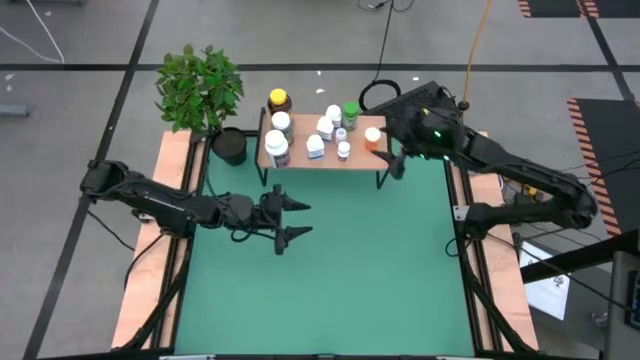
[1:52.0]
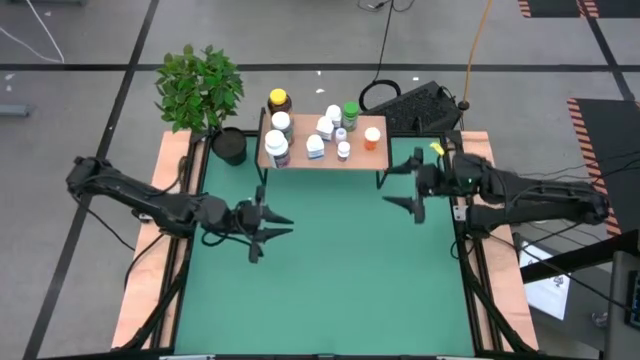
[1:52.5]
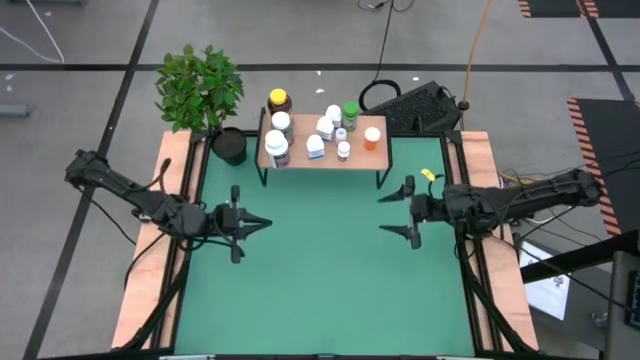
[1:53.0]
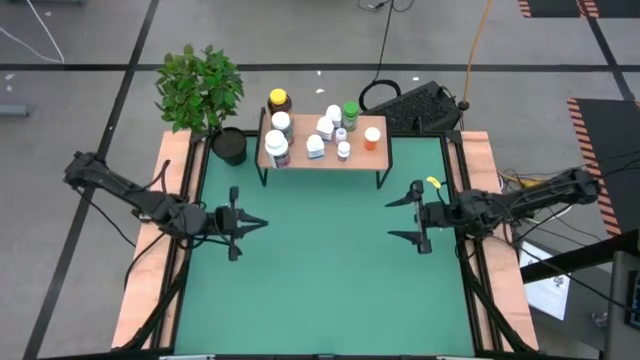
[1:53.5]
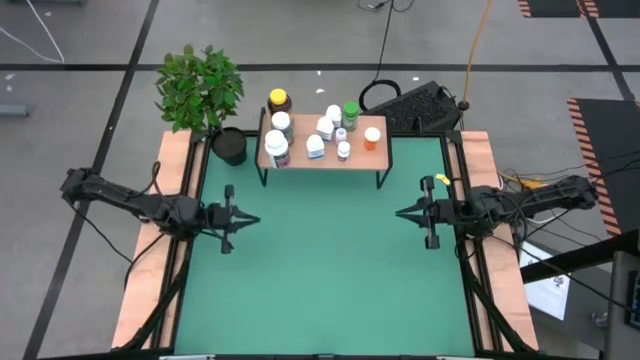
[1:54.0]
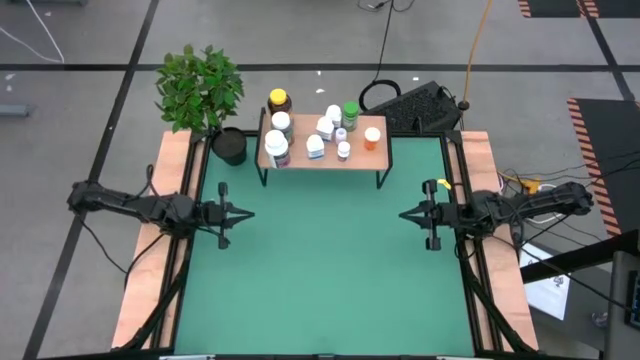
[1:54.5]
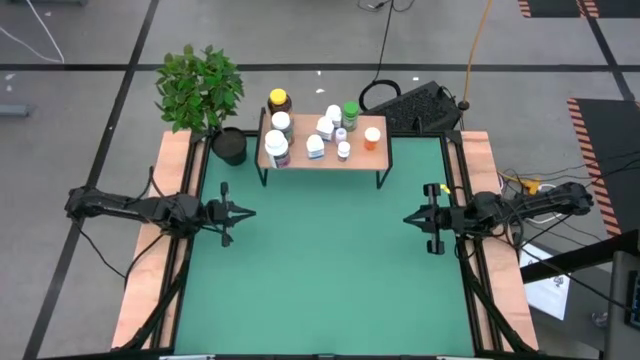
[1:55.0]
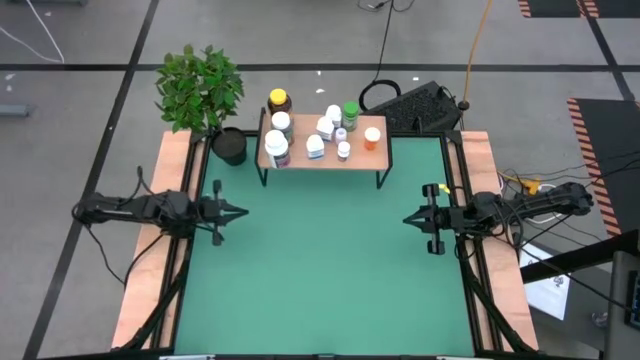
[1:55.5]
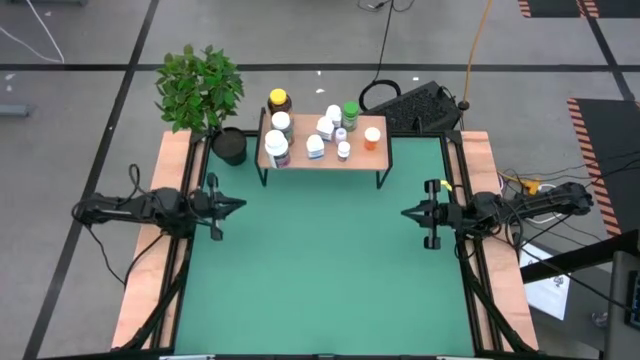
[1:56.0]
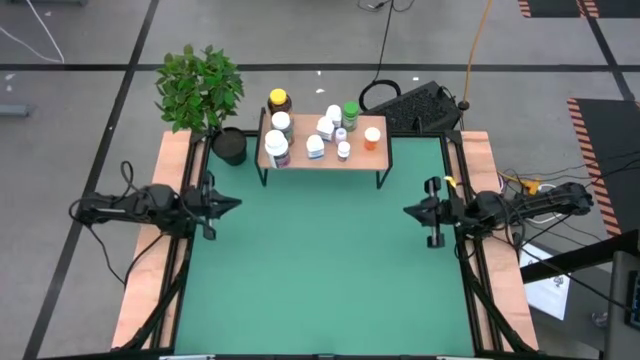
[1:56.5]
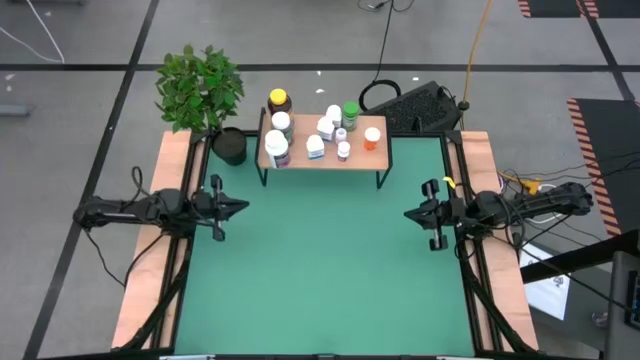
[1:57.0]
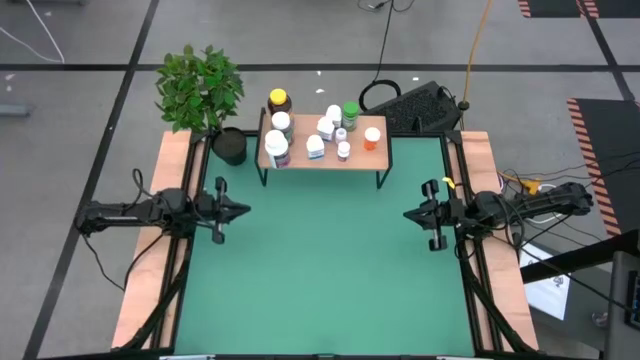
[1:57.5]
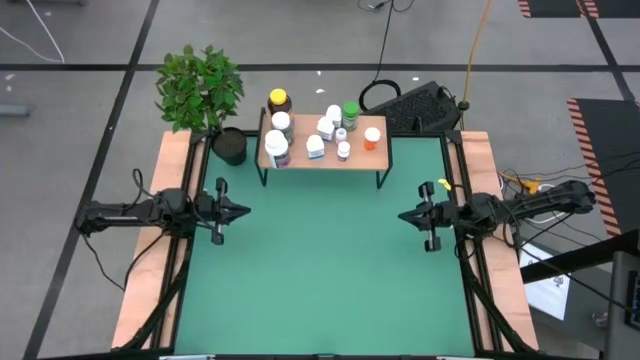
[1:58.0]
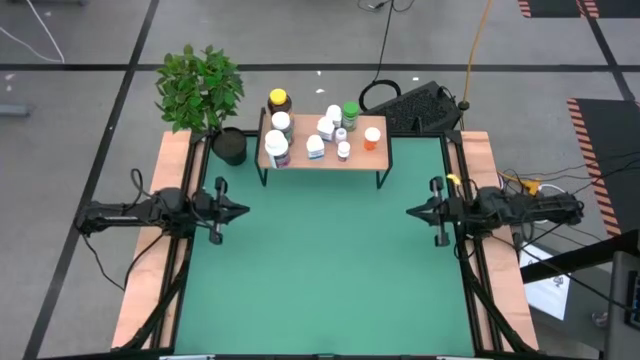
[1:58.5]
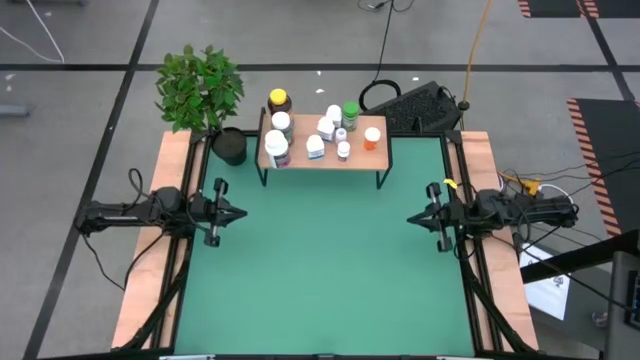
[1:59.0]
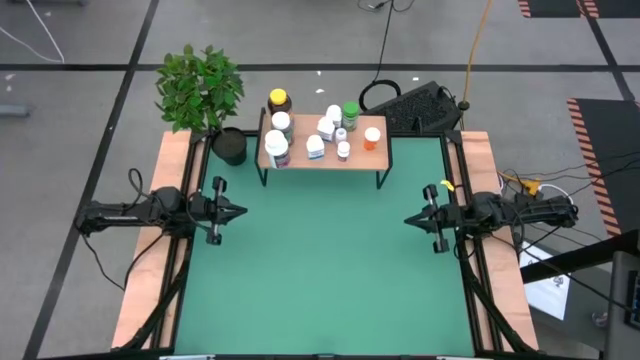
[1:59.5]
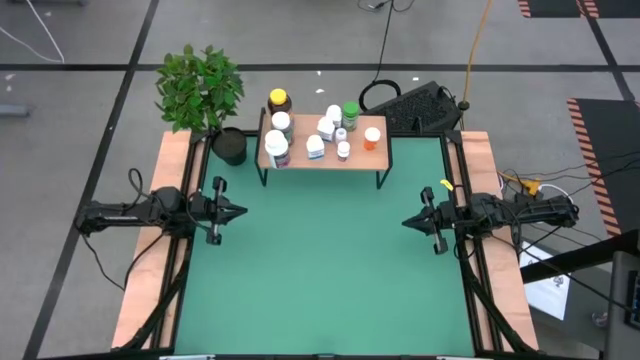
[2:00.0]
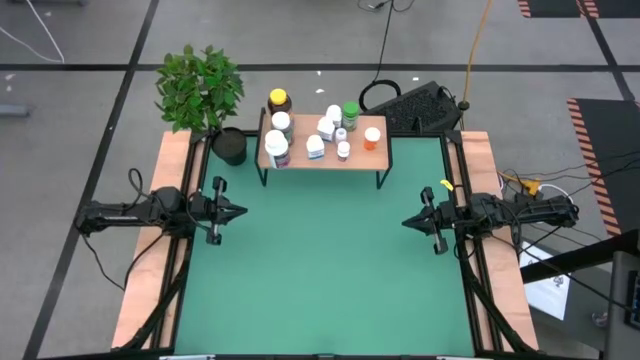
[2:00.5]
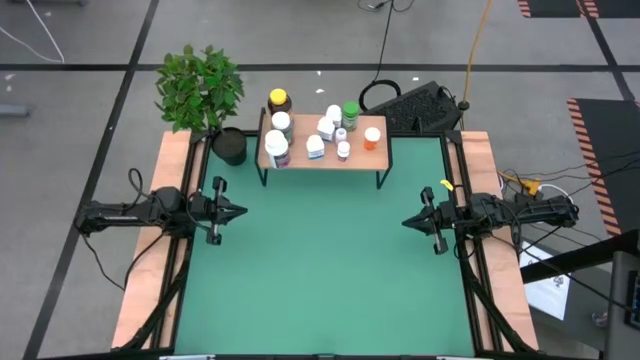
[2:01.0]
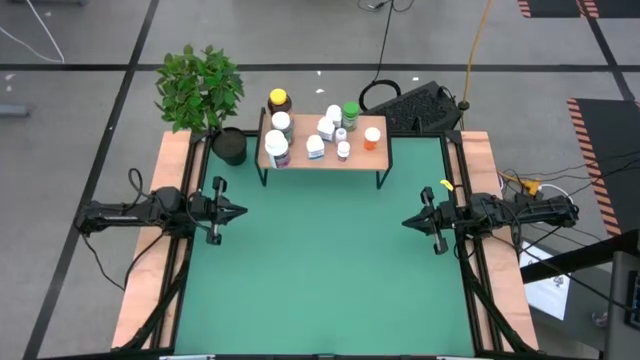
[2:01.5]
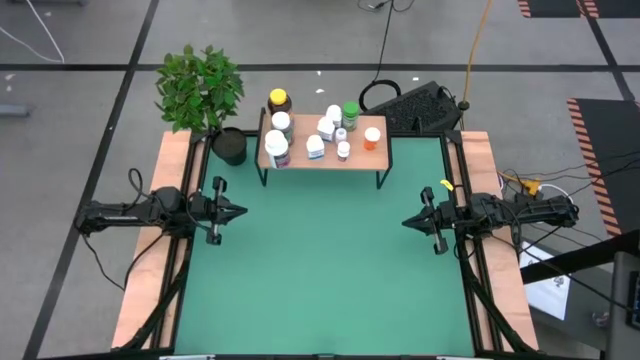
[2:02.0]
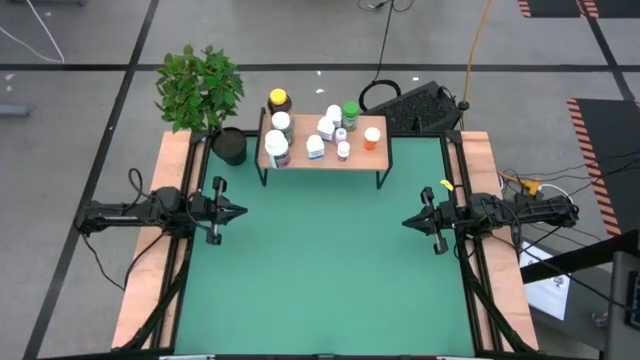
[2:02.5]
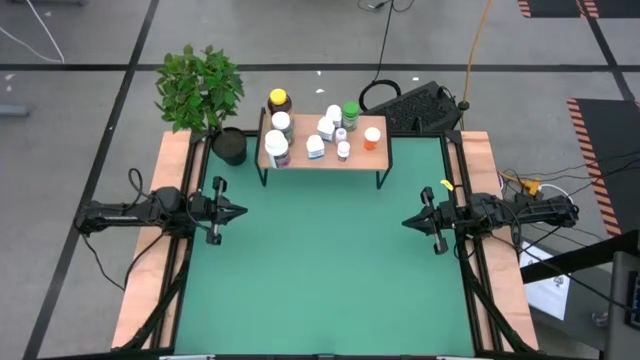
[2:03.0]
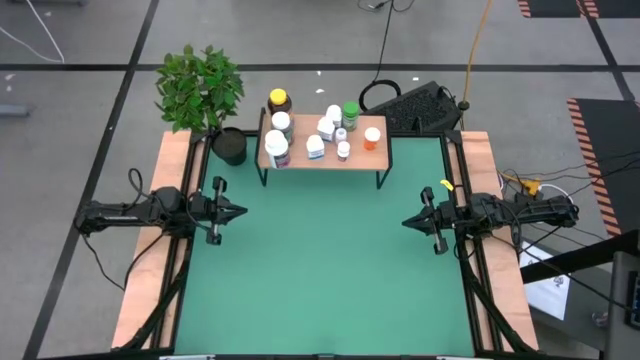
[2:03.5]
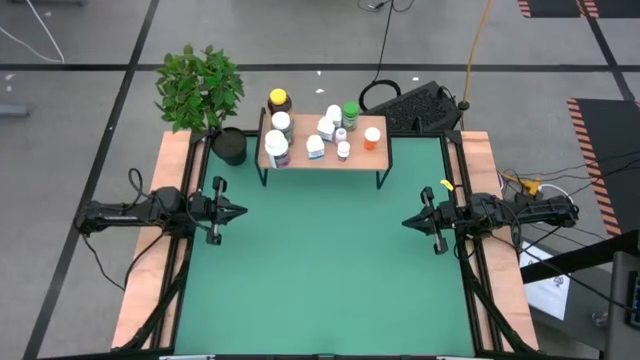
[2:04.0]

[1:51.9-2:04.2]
Task: Pick and place medicine bottles onto shelf by color
Return to Home Position
